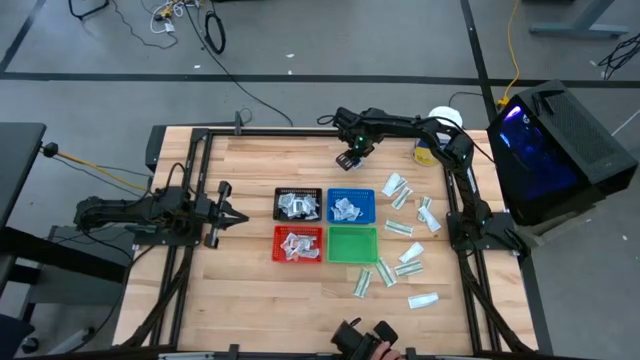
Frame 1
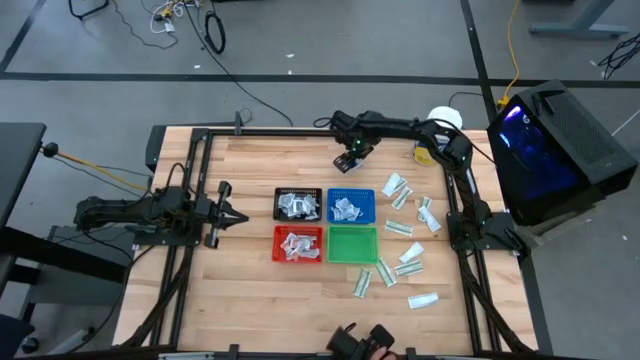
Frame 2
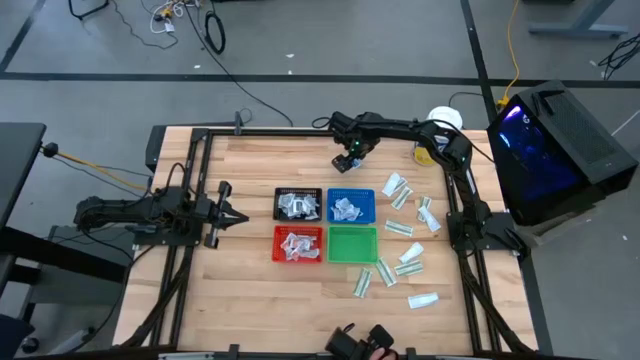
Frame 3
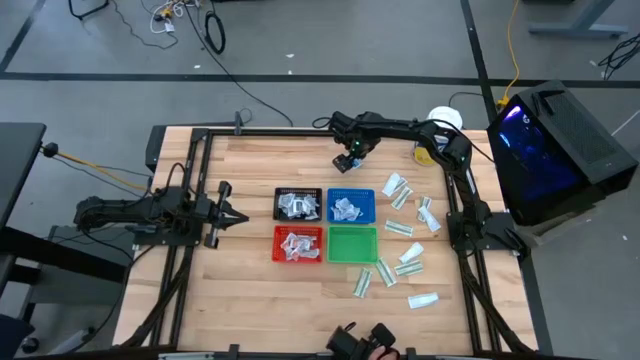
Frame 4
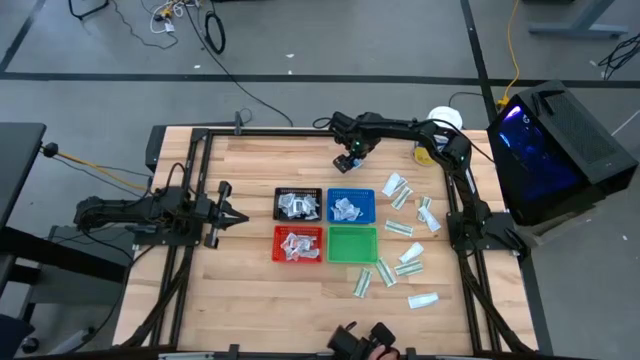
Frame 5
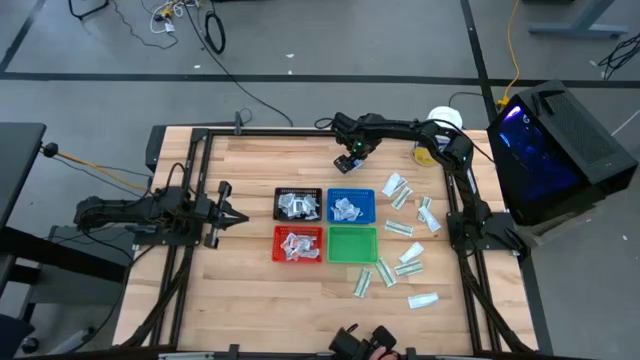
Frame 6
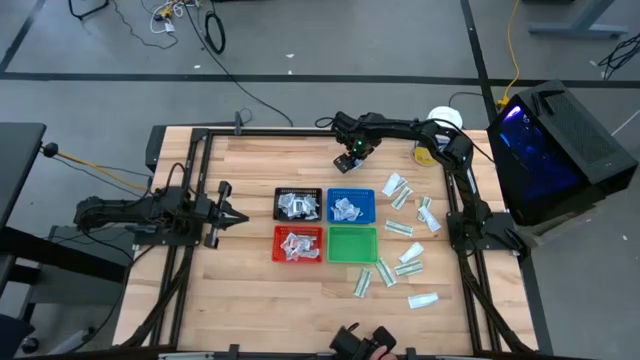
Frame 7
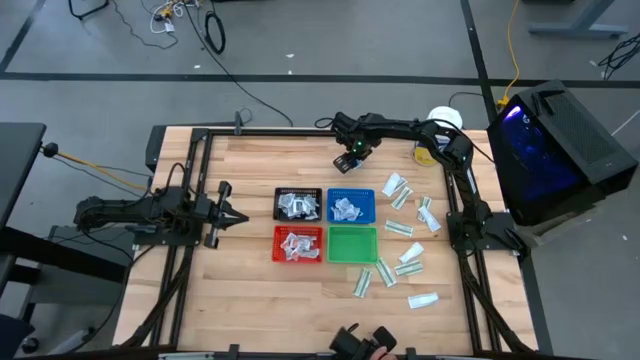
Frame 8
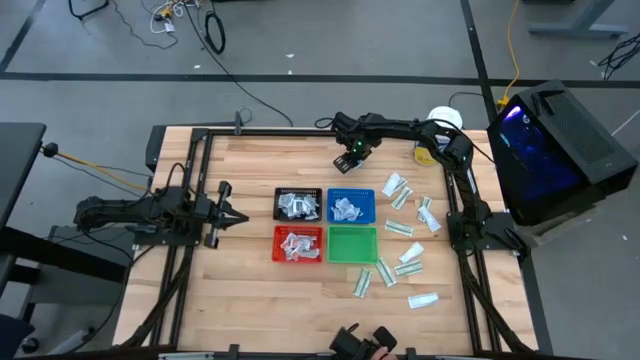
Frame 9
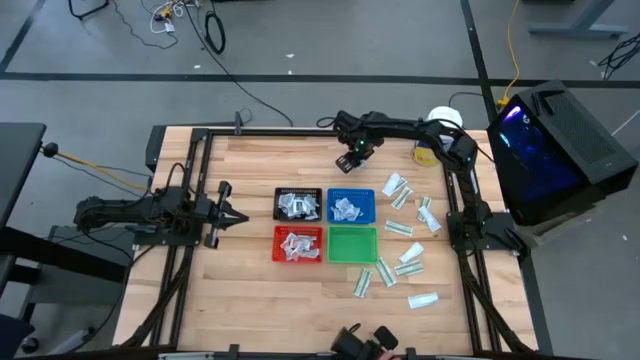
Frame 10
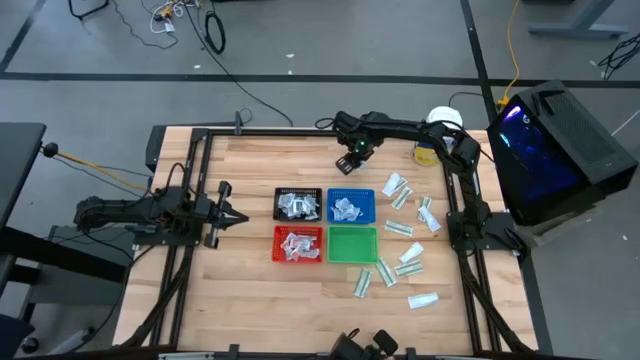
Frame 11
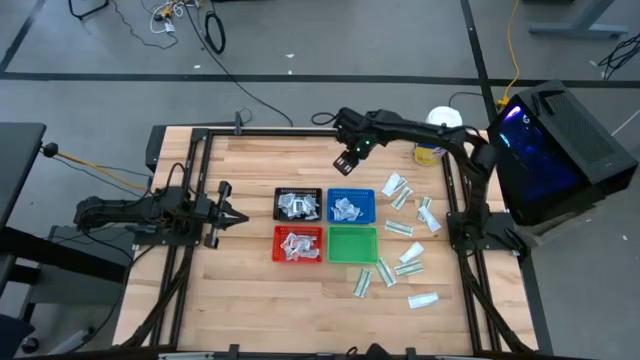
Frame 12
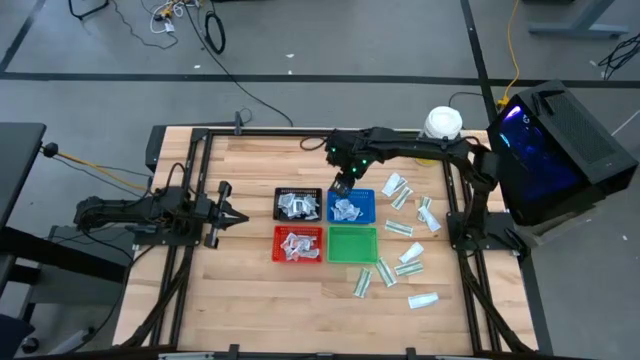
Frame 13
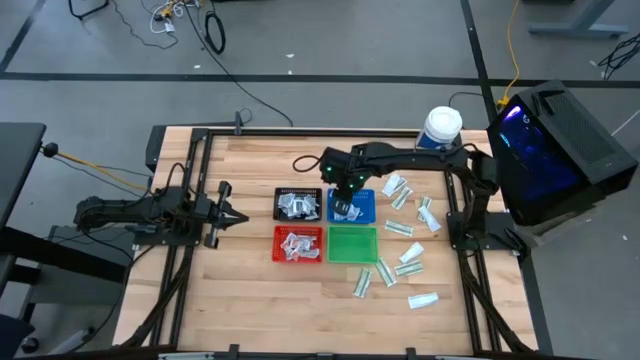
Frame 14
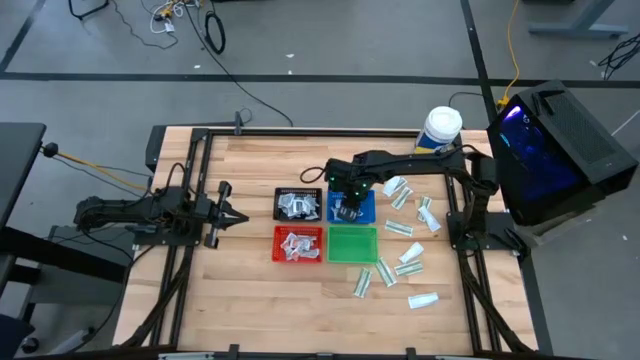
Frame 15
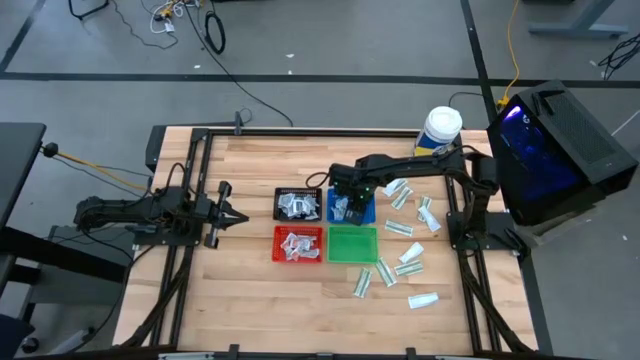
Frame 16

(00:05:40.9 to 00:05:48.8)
Task: Pick & Place First Aid Supplies
Put the blue alcohol pad into the blue bin

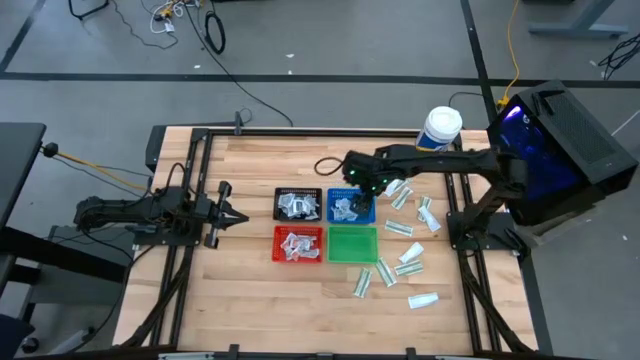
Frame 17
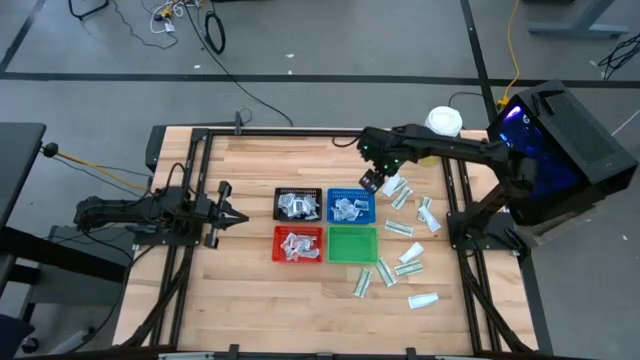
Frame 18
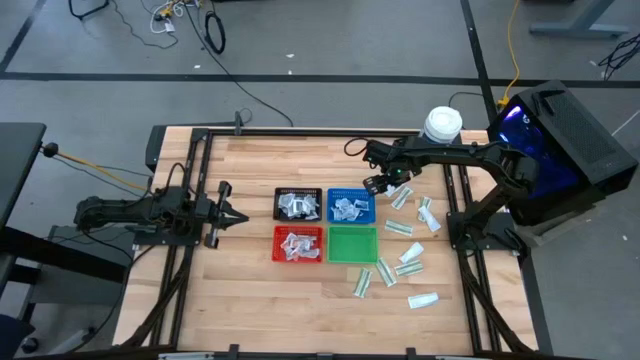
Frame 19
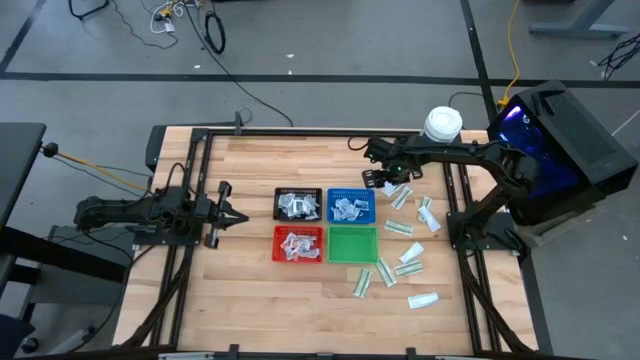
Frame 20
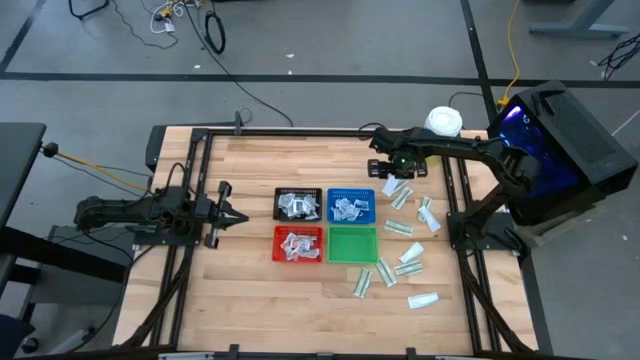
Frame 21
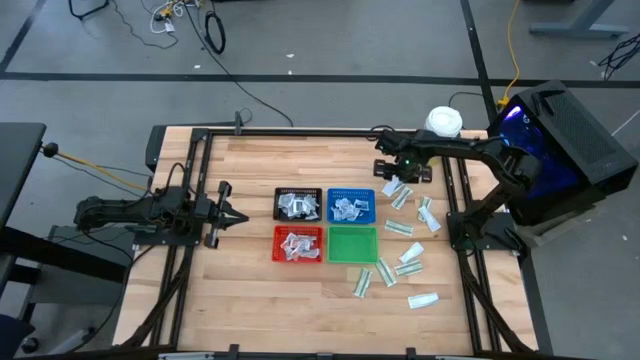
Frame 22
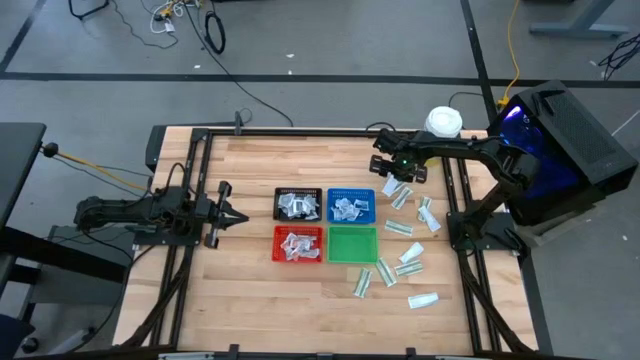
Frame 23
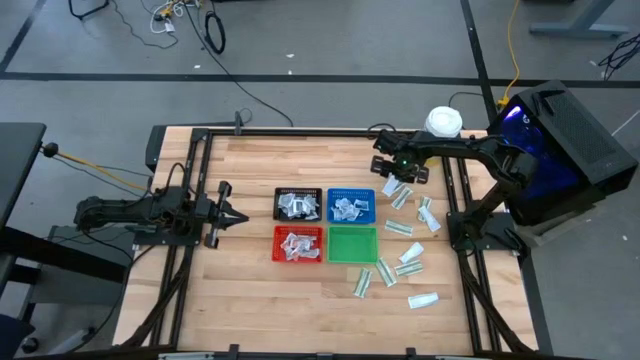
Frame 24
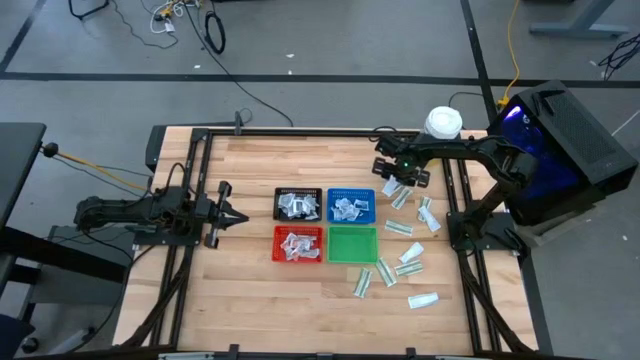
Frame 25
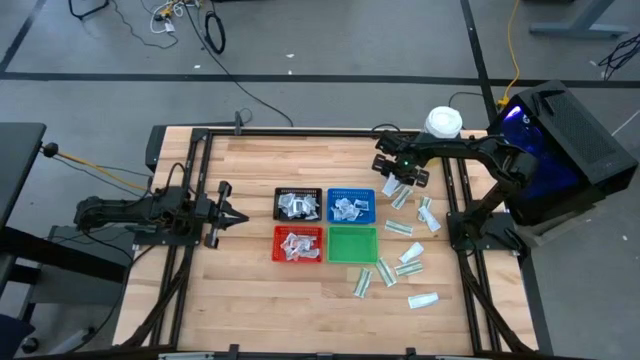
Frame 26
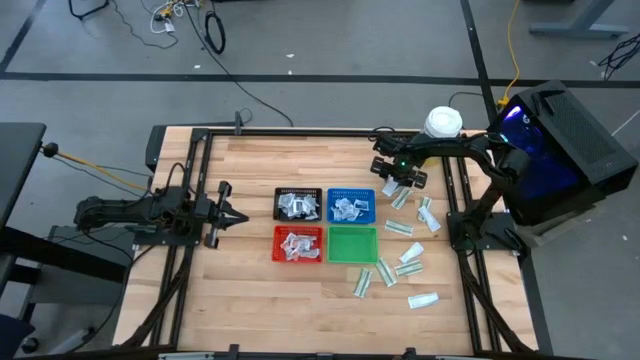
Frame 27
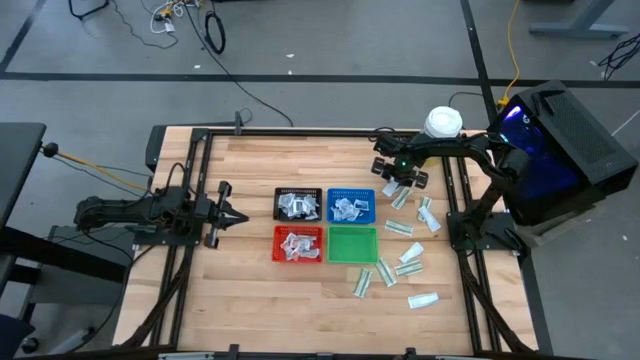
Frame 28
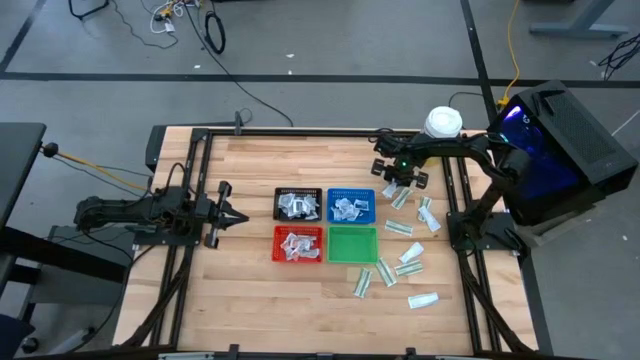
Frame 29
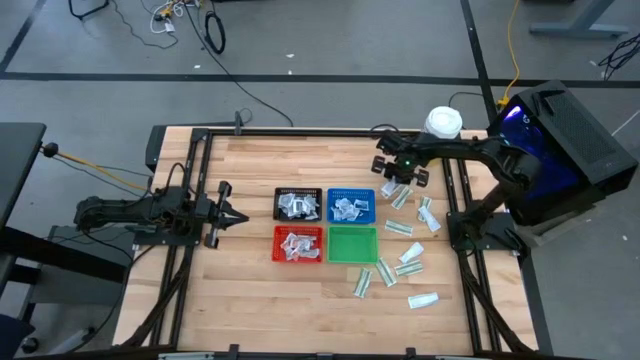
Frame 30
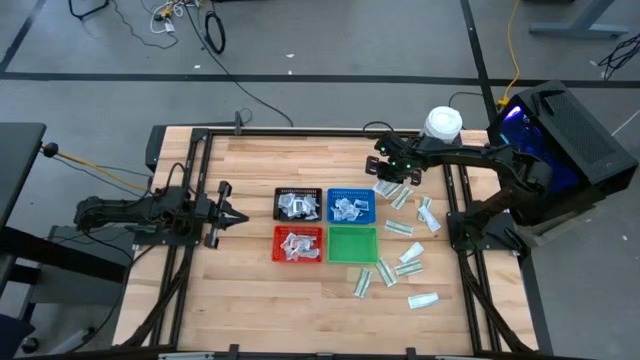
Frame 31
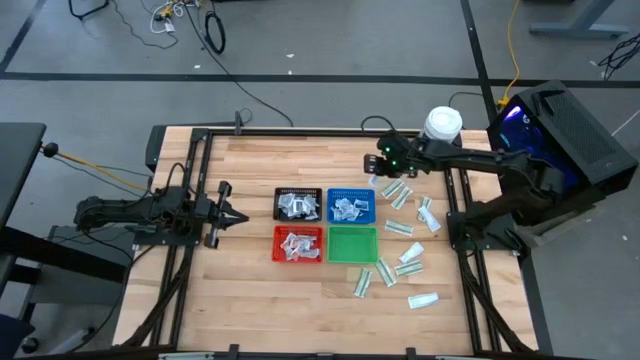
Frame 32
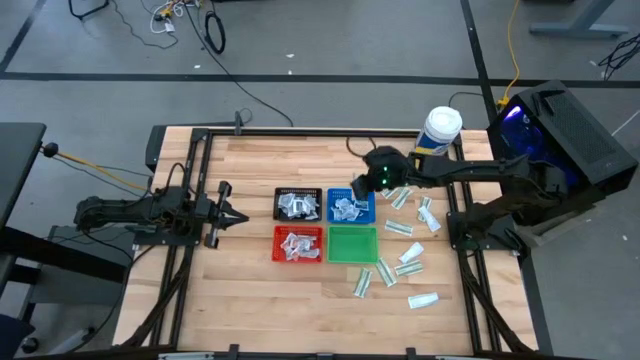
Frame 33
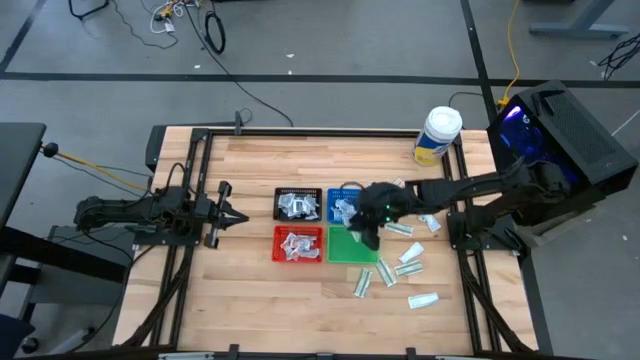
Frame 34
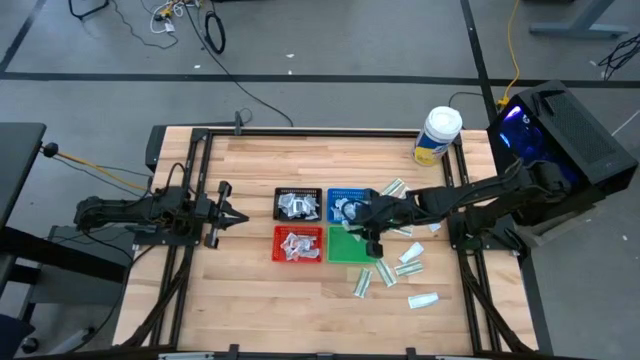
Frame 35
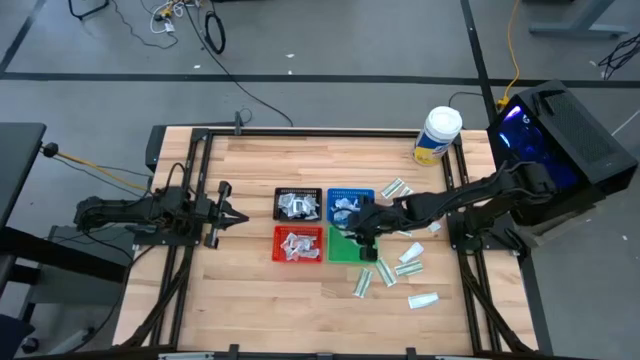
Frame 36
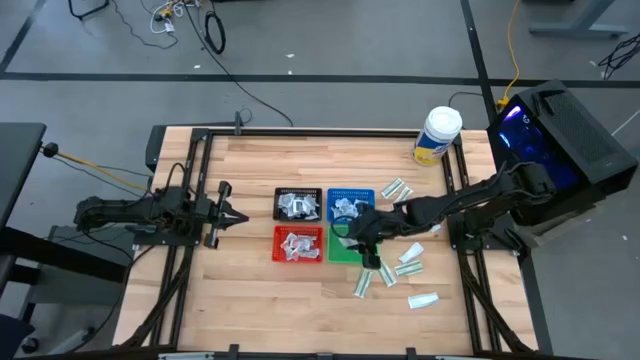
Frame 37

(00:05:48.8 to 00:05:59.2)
Put the green bandage pack into the green bin

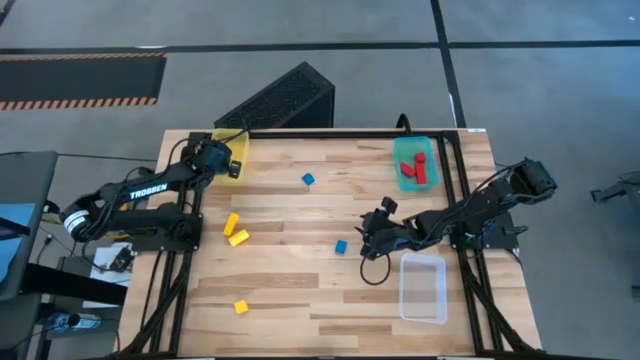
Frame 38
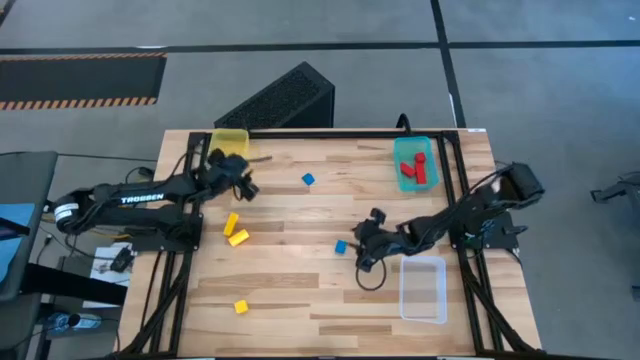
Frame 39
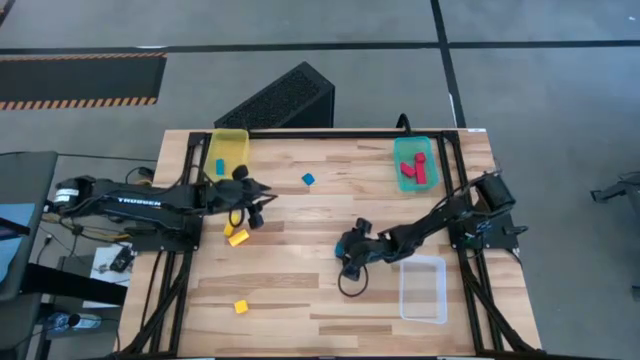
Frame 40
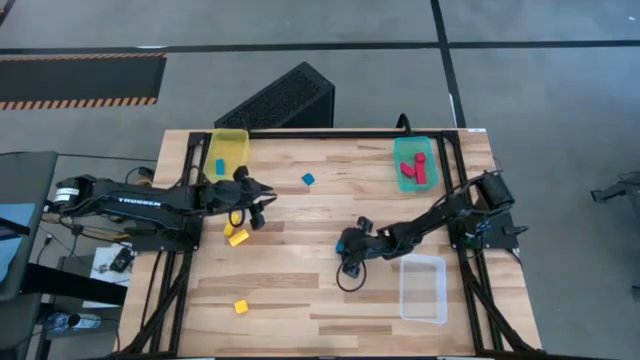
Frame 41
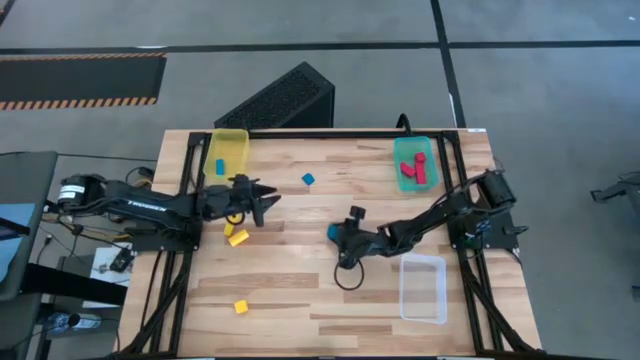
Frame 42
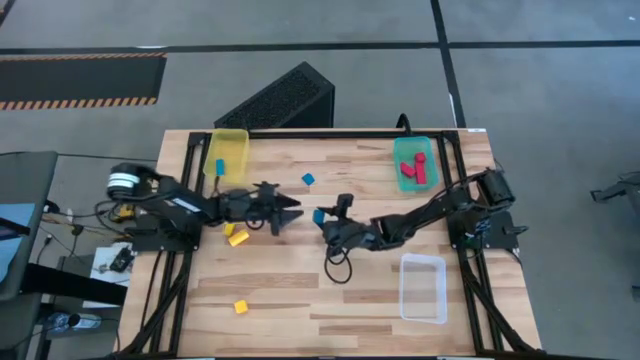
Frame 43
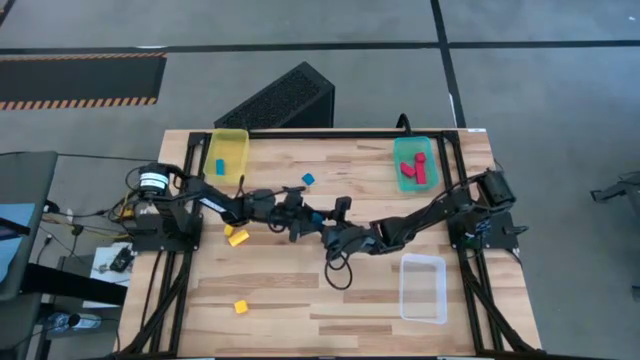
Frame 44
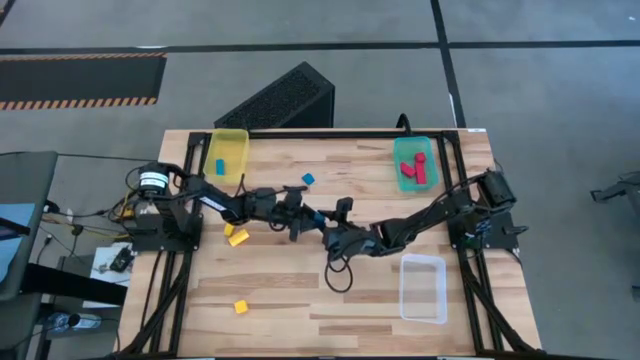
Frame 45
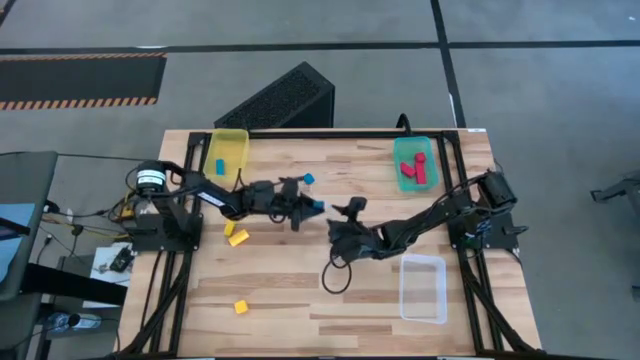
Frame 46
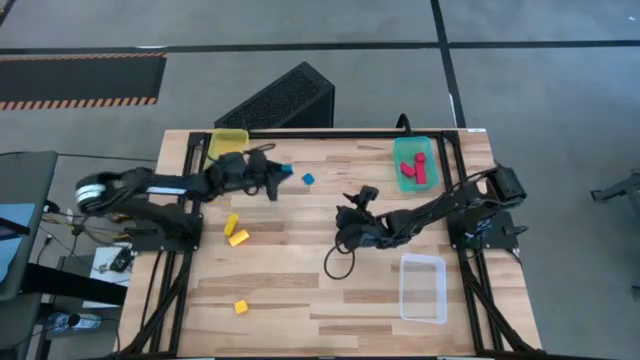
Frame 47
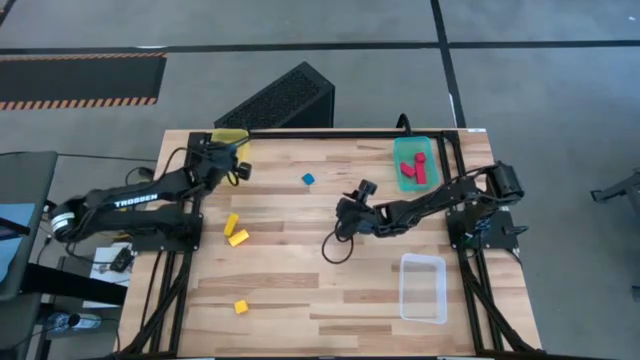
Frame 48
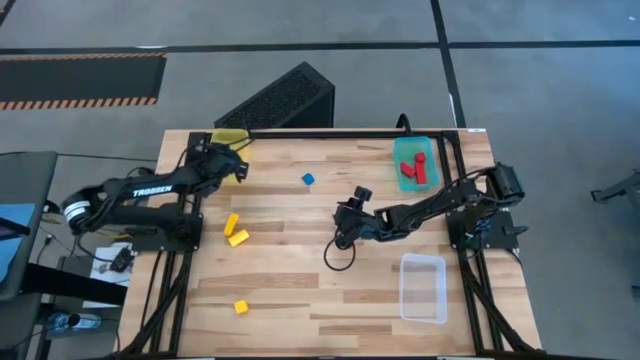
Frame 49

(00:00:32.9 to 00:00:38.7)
Task: Sort & place blocks by color
Put the bottom blue block into the yellow bin
